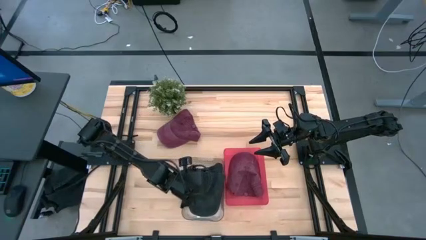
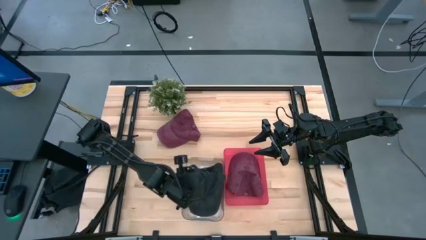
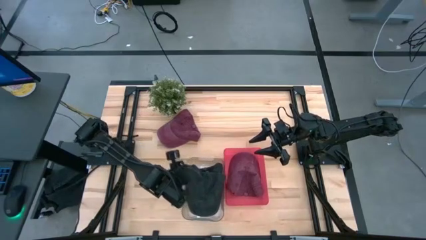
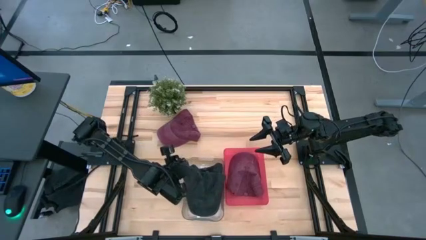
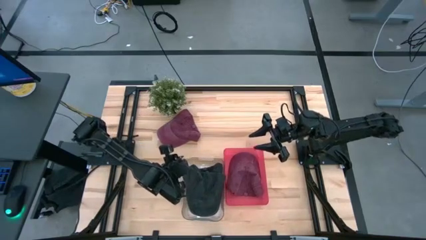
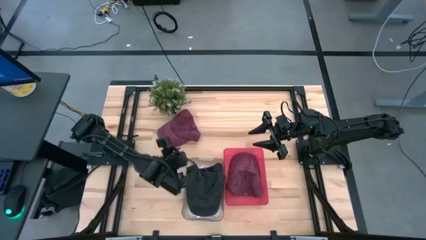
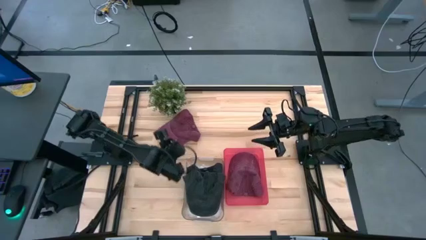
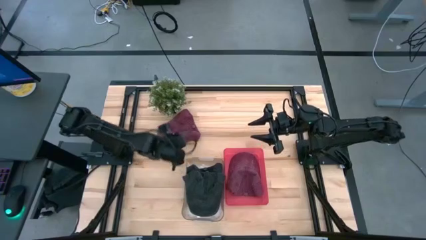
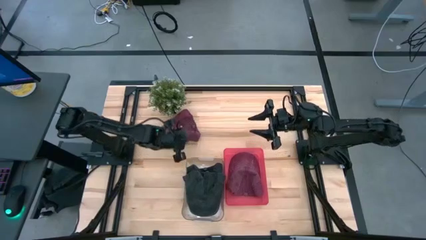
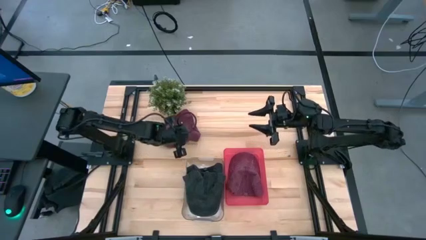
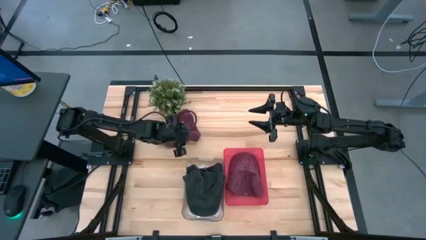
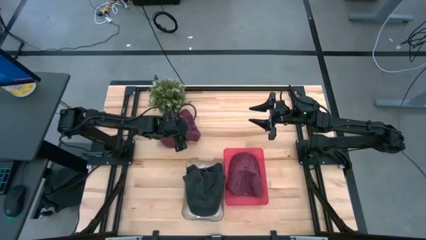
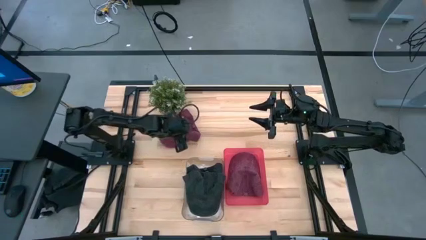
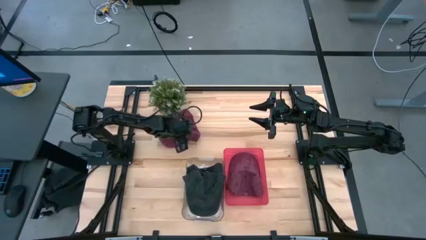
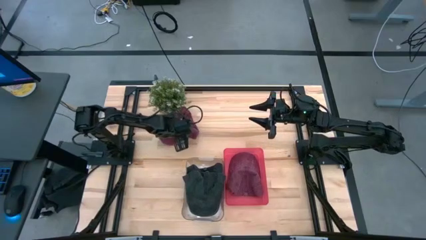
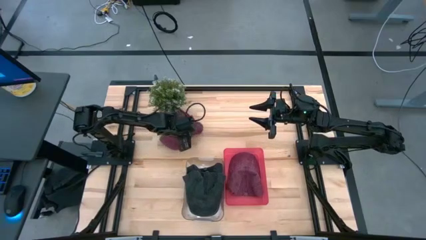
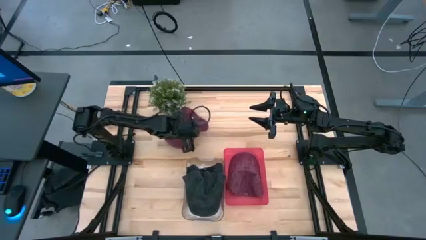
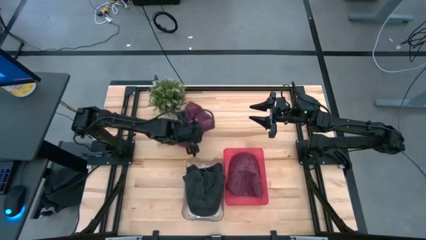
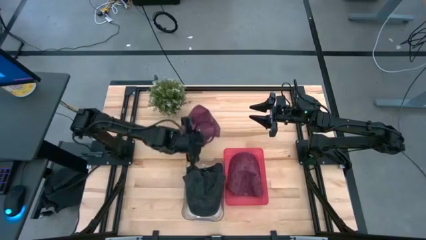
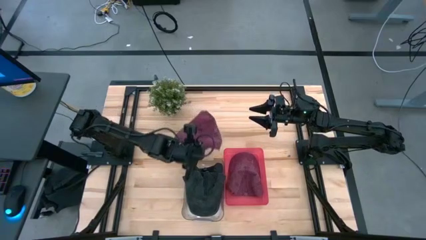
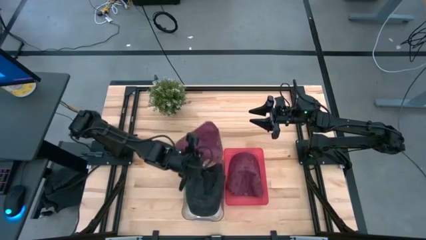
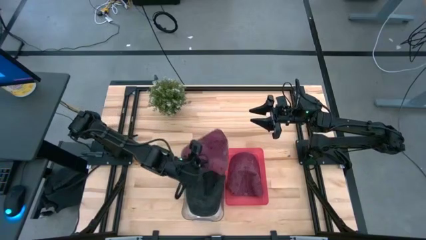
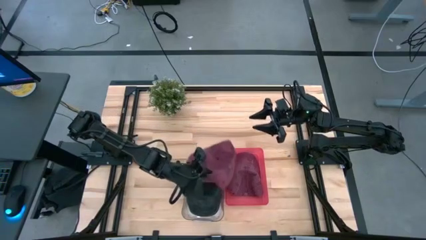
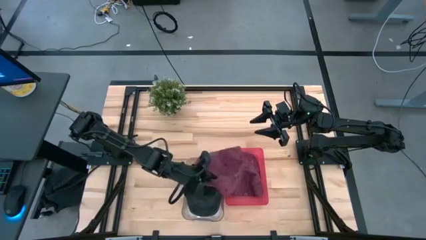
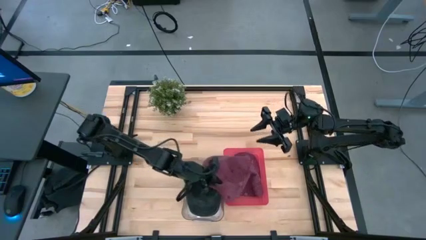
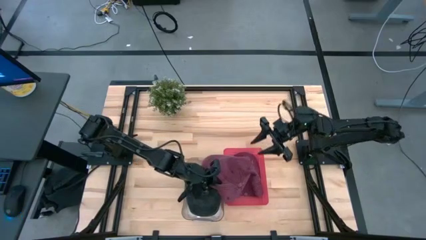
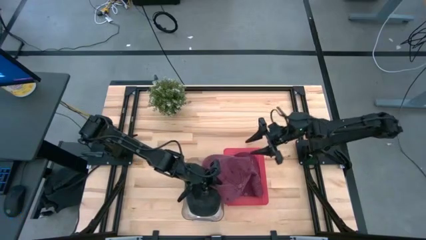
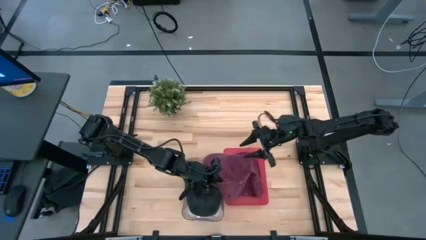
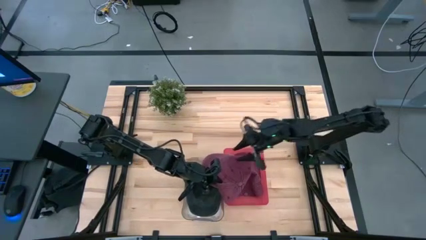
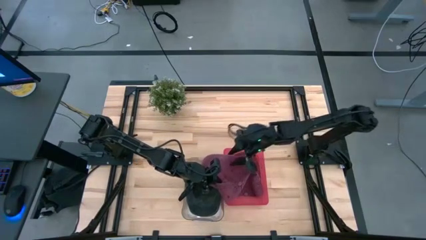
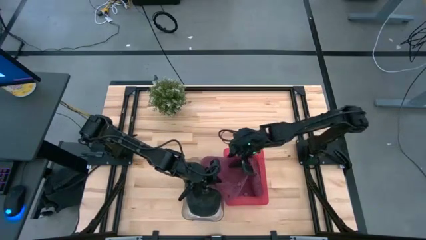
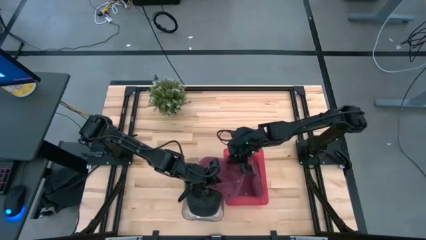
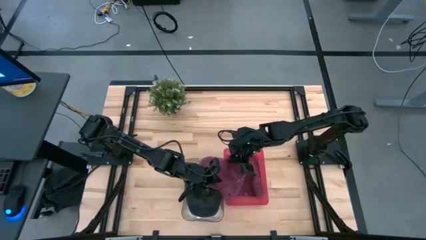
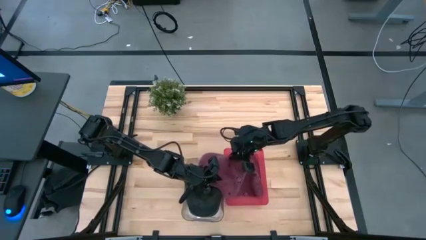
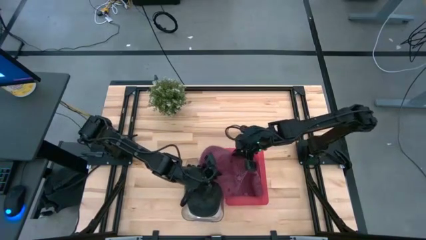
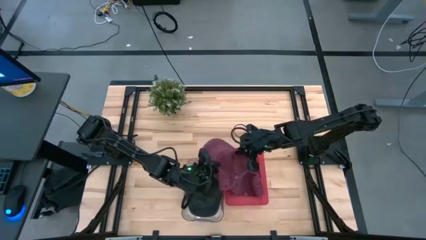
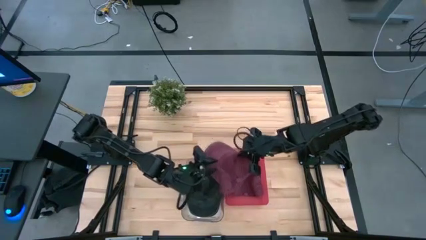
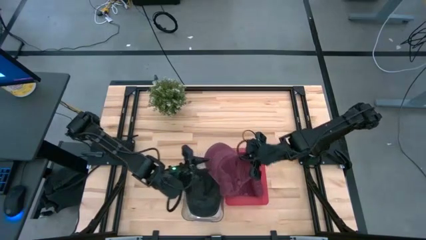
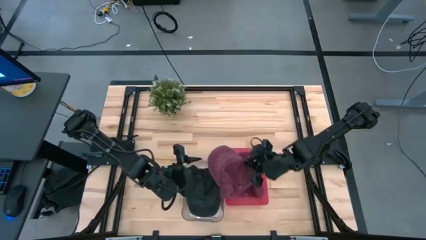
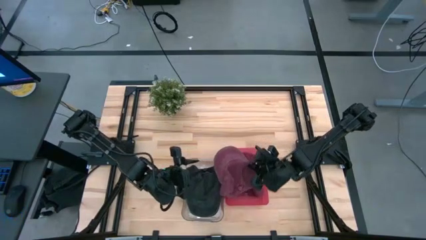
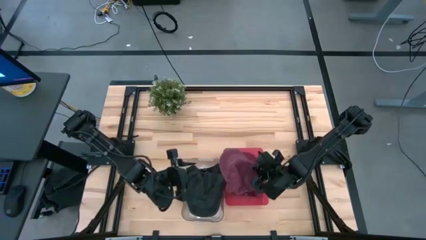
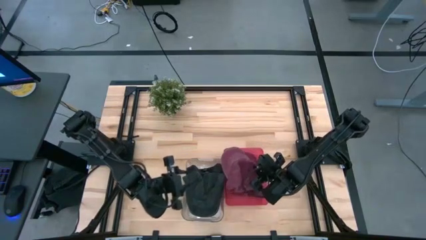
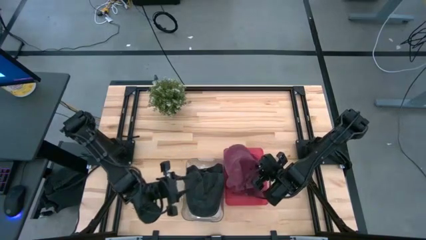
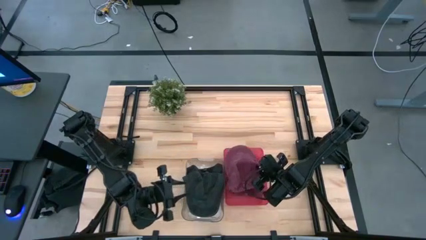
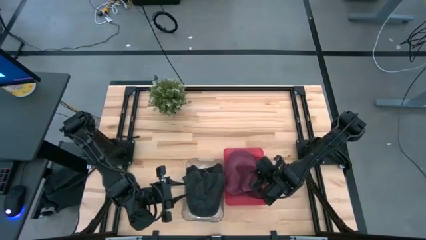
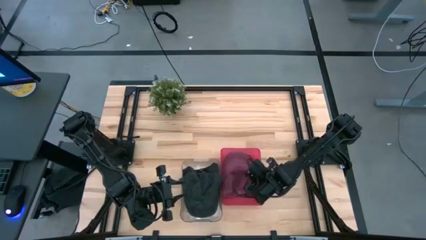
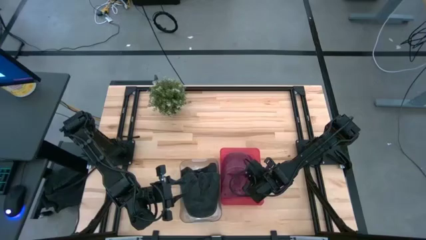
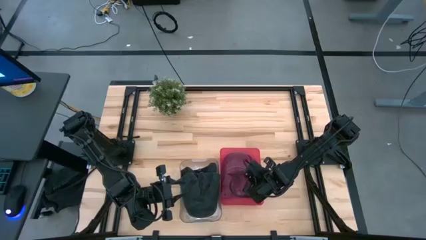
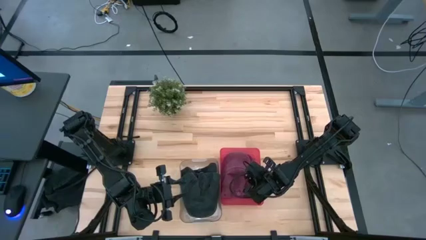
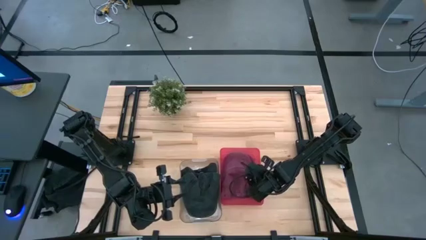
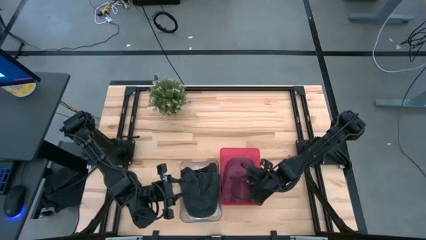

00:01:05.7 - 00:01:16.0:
Task: Pick & Place hat
Put the red cap in the red bin

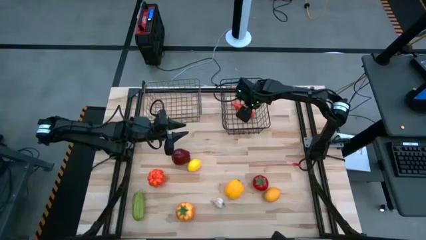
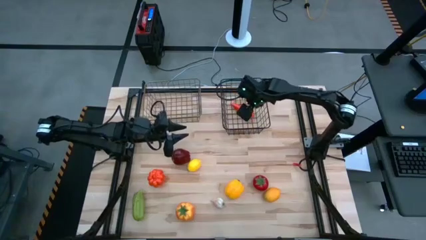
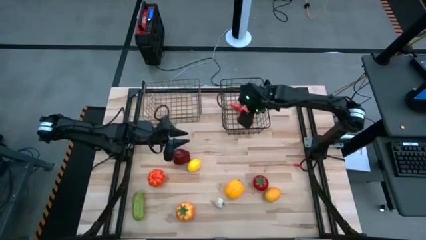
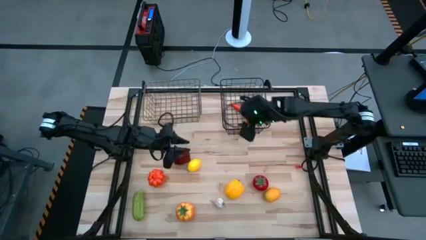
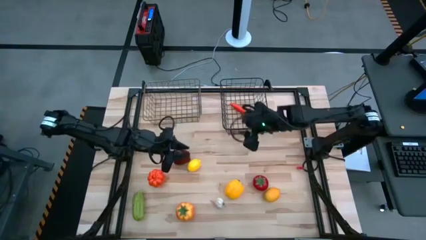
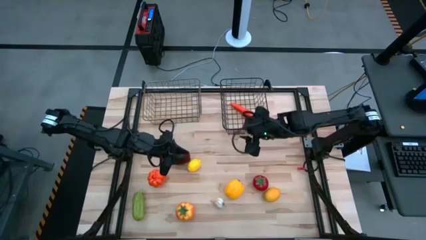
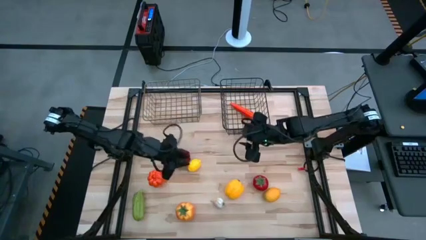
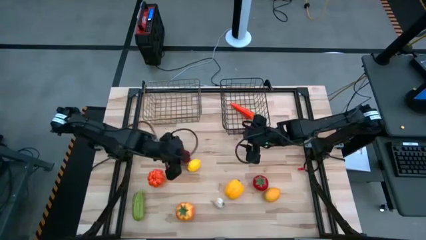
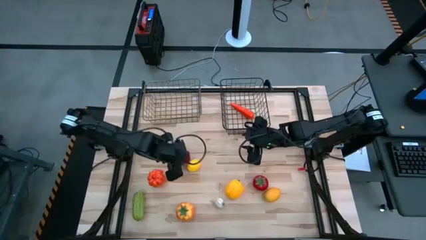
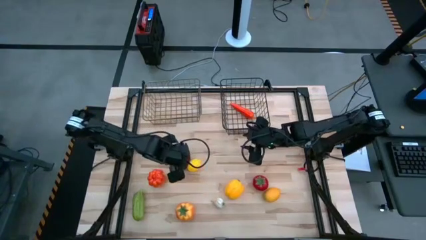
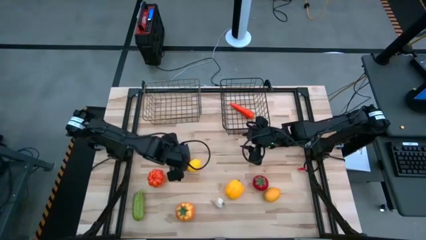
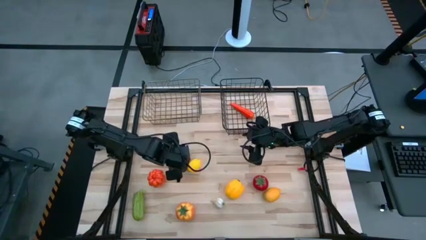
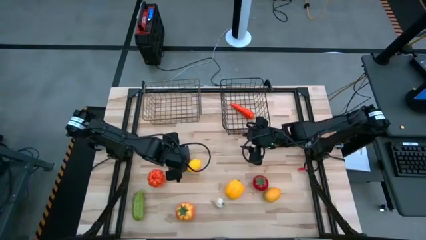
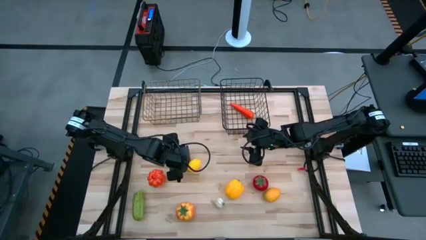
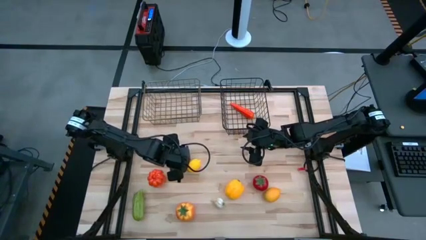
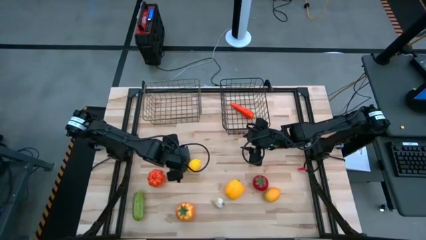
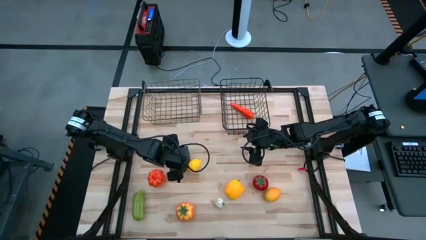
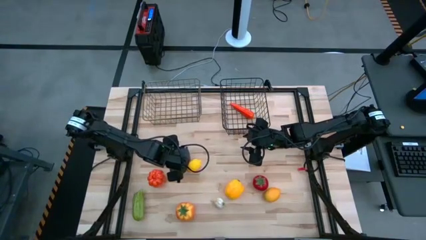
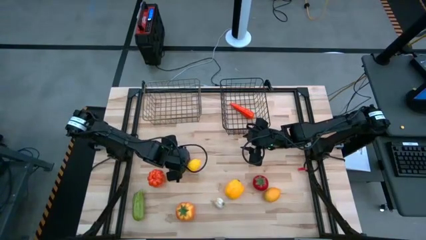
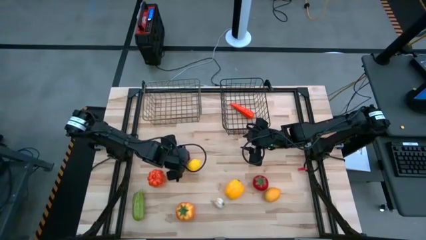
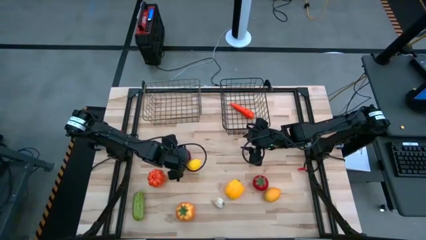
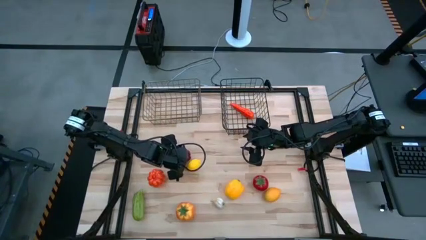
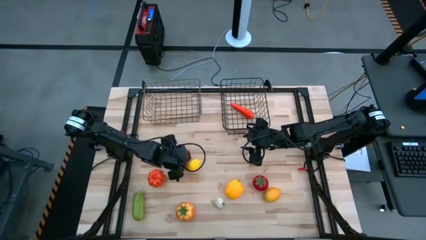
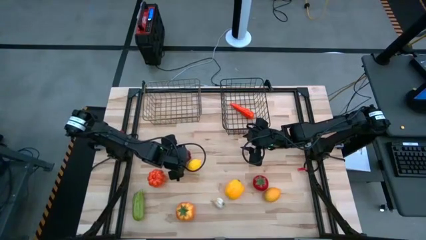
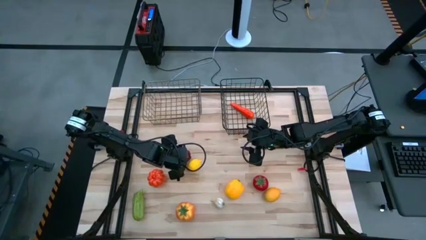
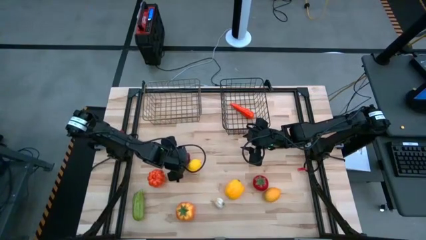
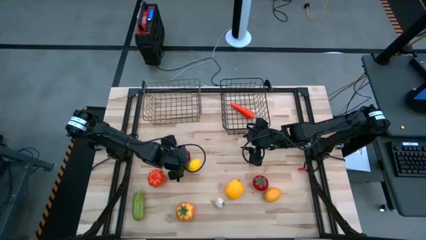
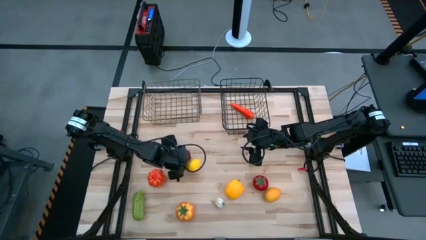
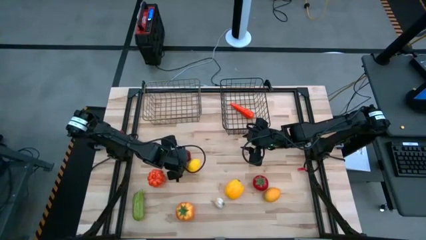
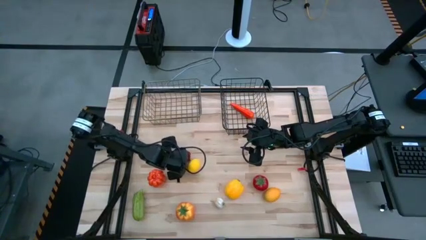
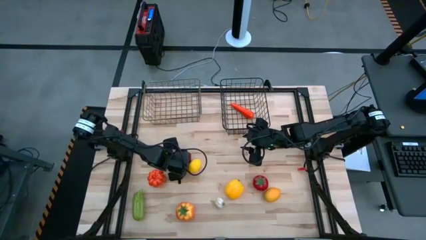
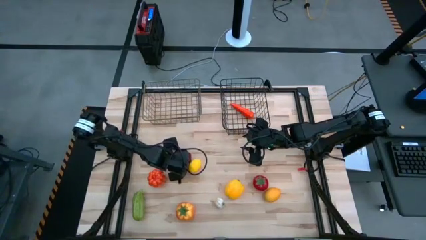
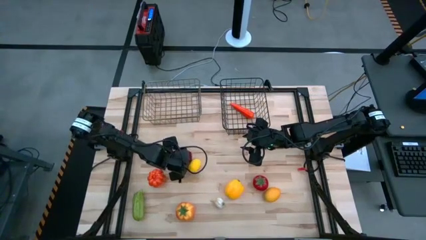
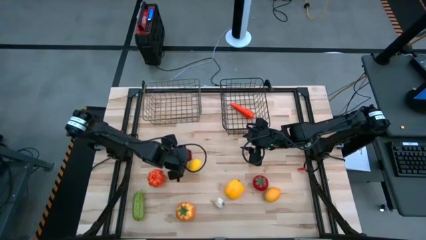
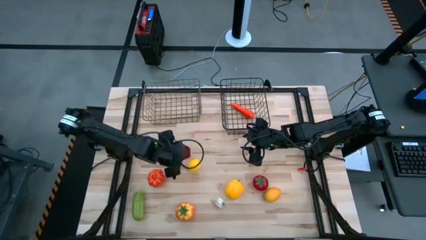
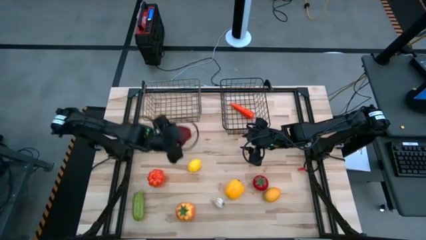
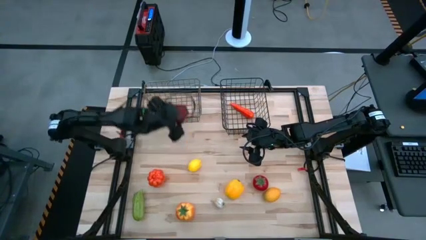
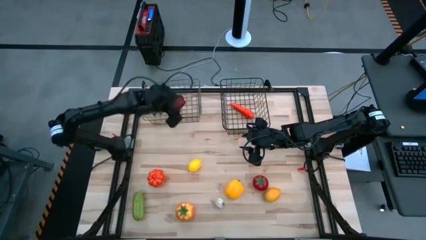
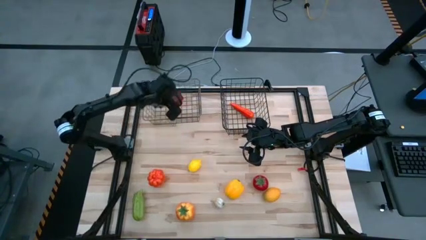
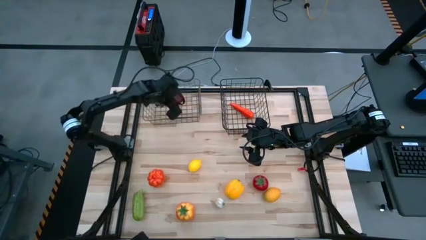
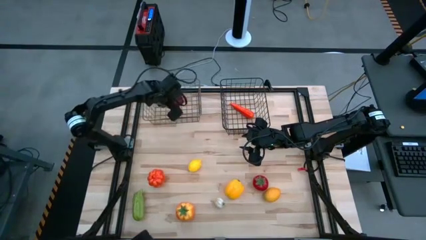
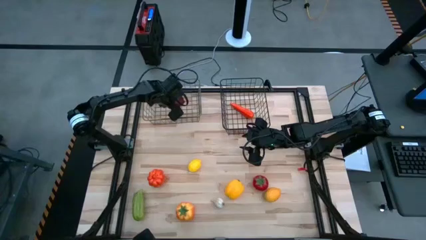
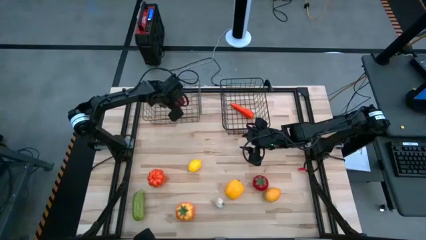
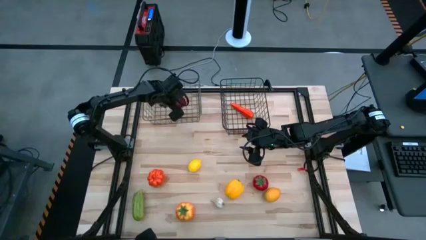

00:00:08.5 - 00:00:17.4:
Task: Sort produce into baskets
Put the apple into the gold wire basket
